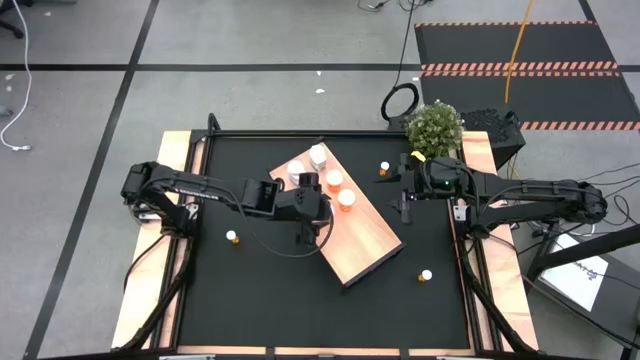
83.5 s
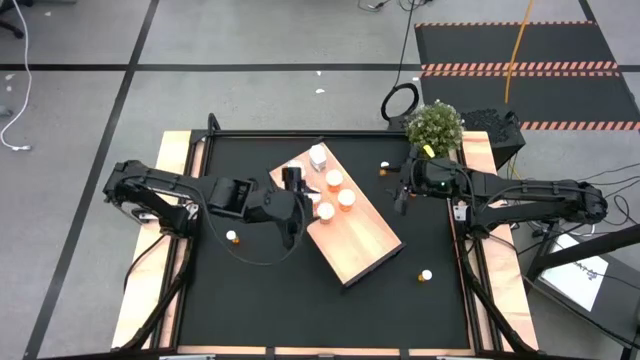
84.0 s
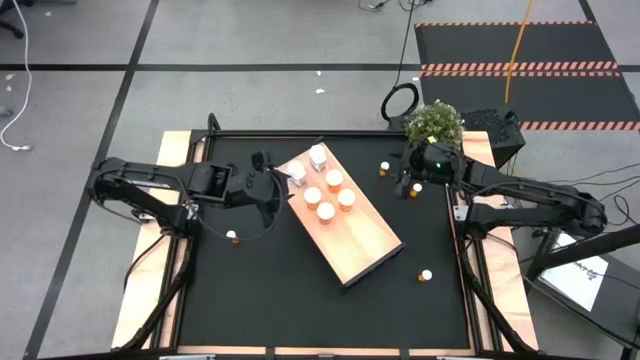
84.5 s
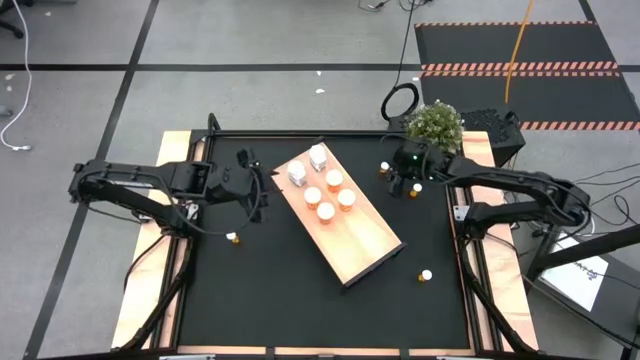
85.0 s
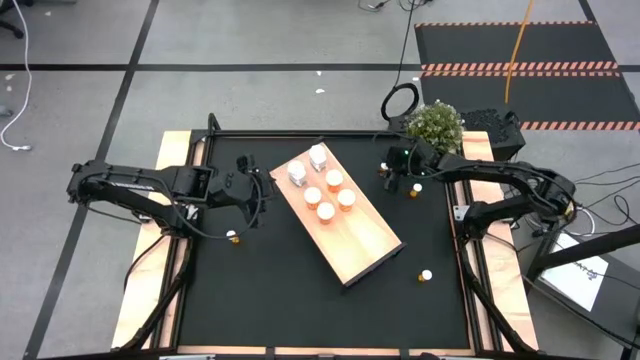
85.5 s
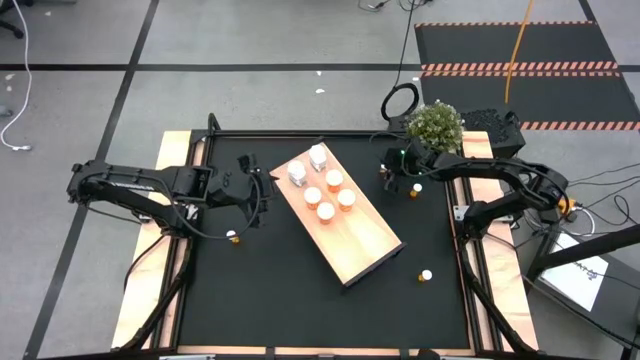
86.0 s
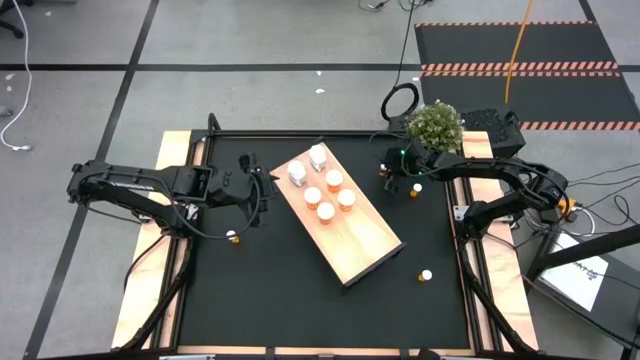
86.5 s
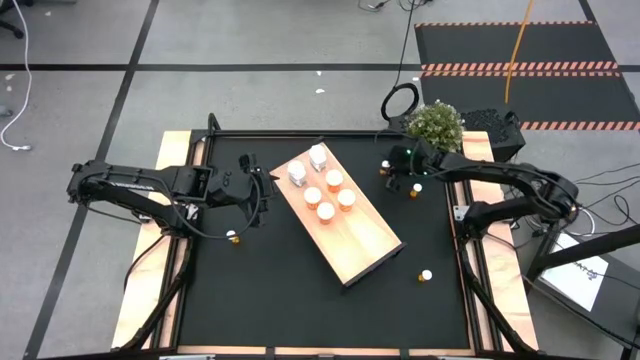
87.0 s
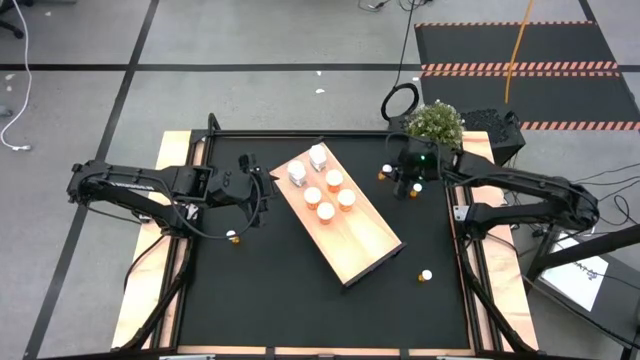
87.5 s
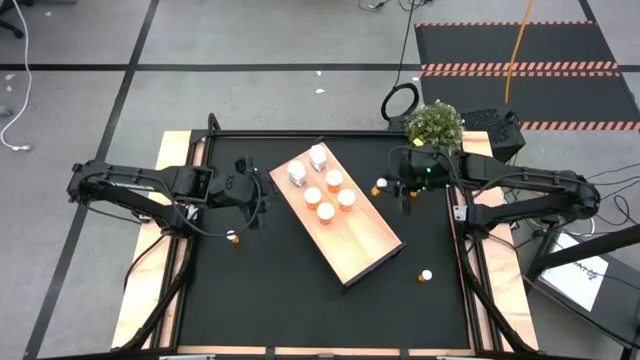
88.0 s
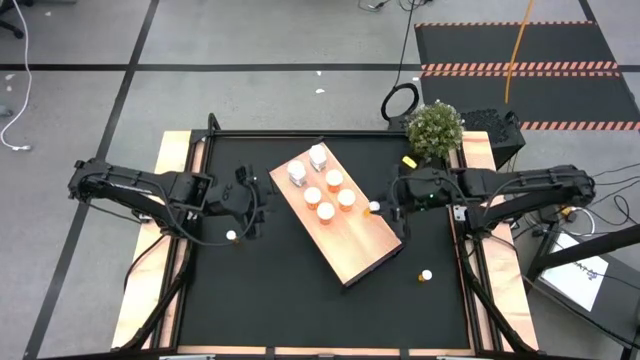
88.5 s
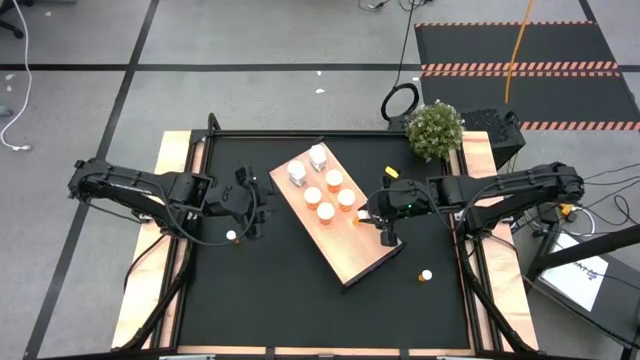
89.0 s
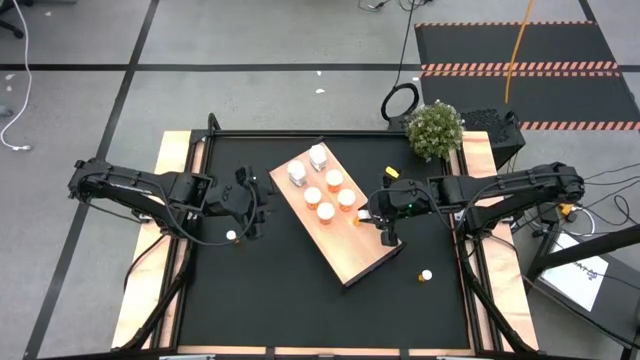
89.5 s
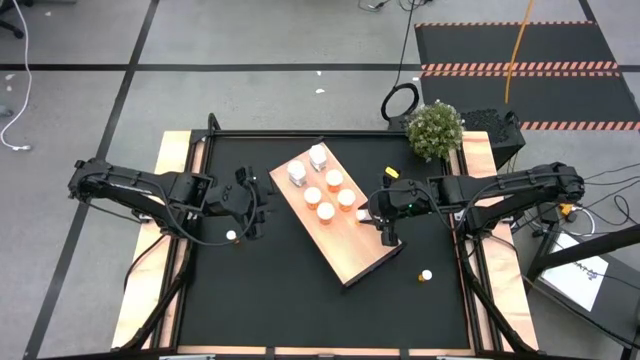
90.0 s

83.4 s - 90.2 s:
Task: Pick and place medicine bottles onto shelf by color
Put the orange tablet bottle on the shelf

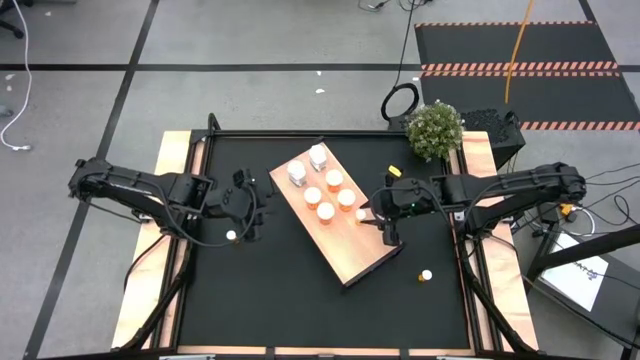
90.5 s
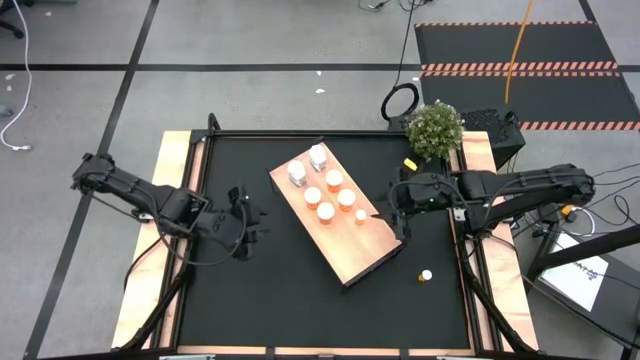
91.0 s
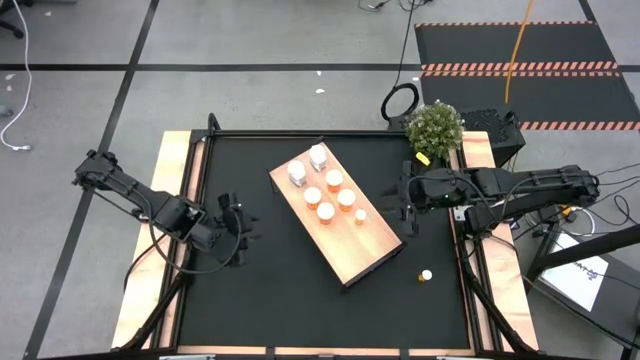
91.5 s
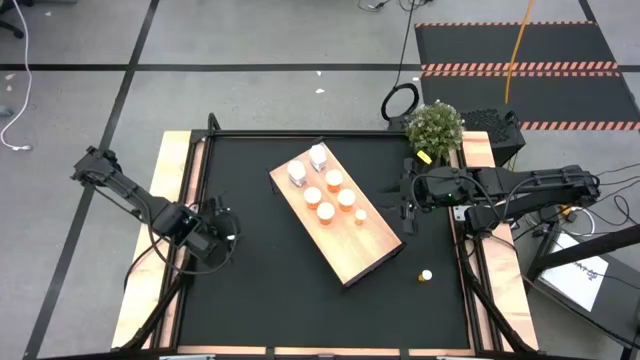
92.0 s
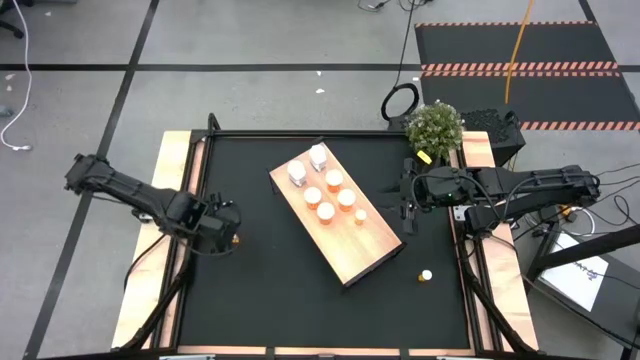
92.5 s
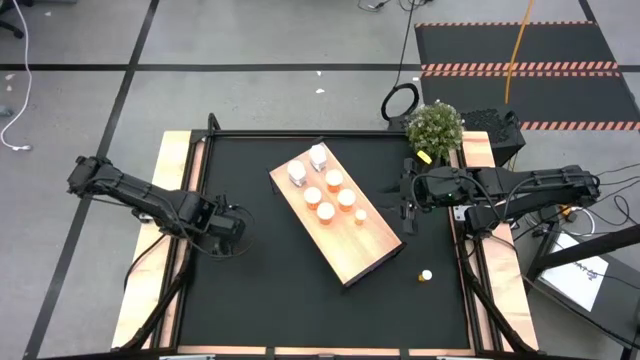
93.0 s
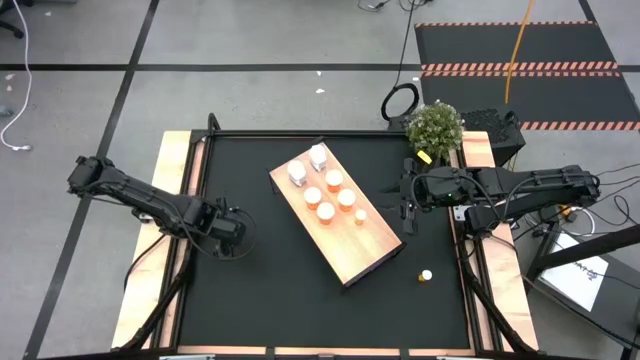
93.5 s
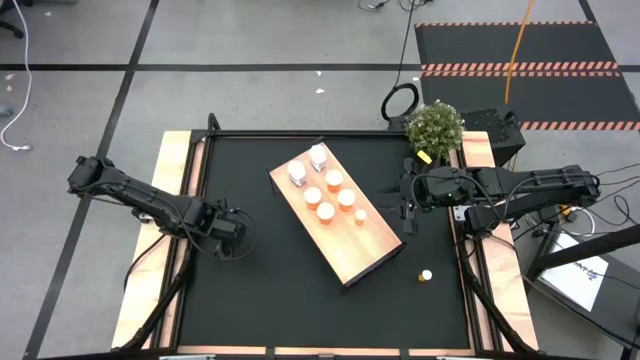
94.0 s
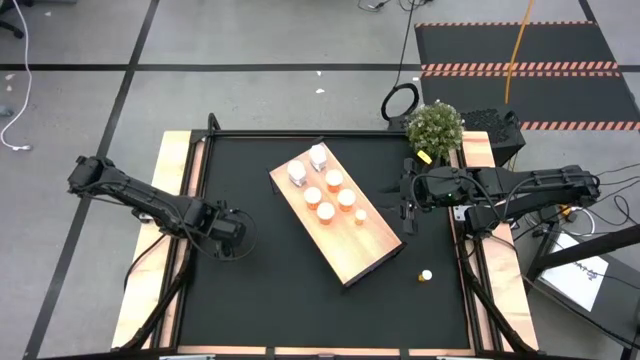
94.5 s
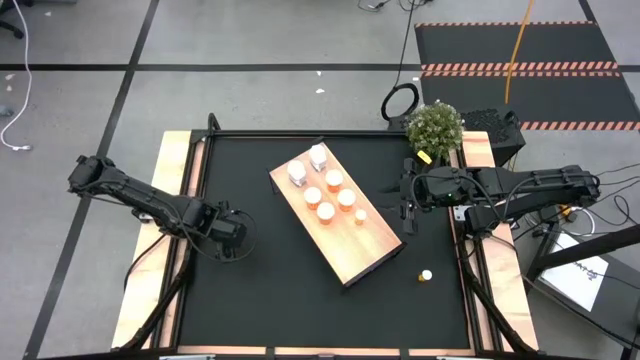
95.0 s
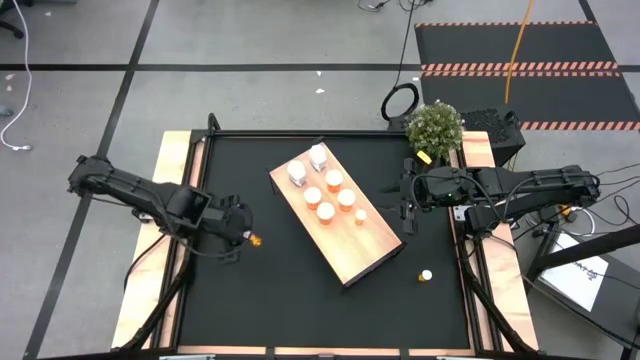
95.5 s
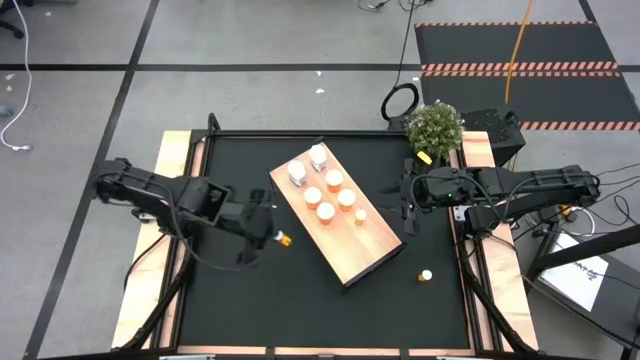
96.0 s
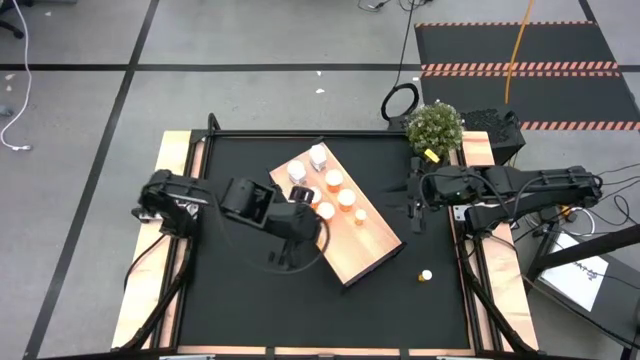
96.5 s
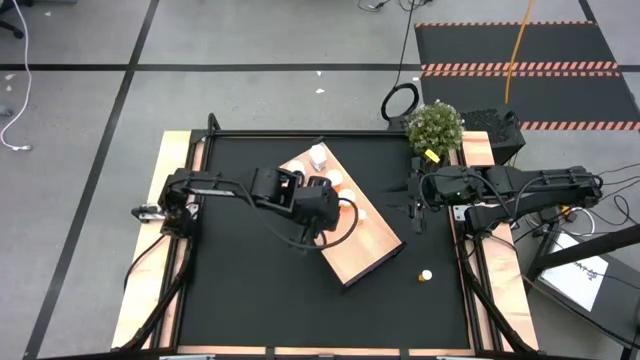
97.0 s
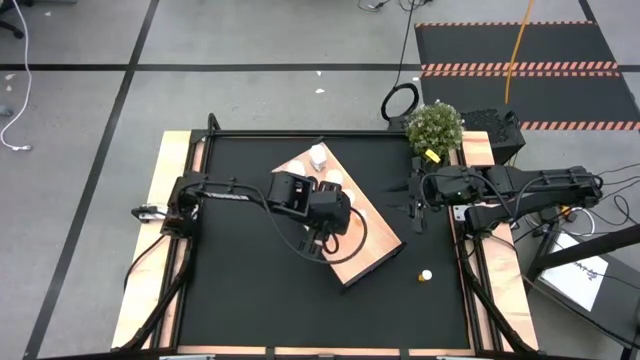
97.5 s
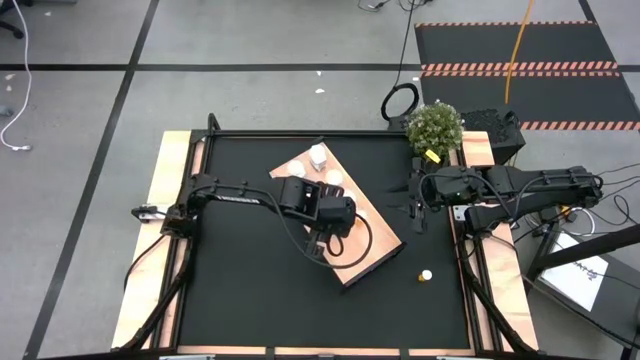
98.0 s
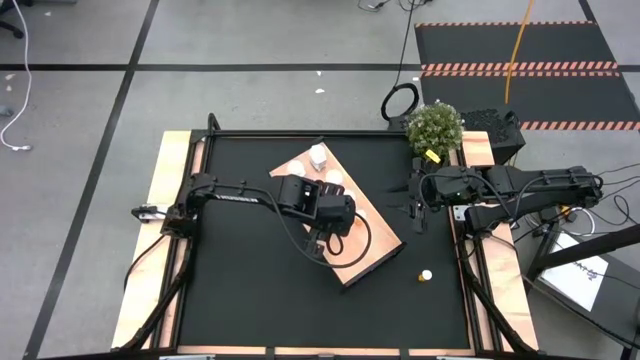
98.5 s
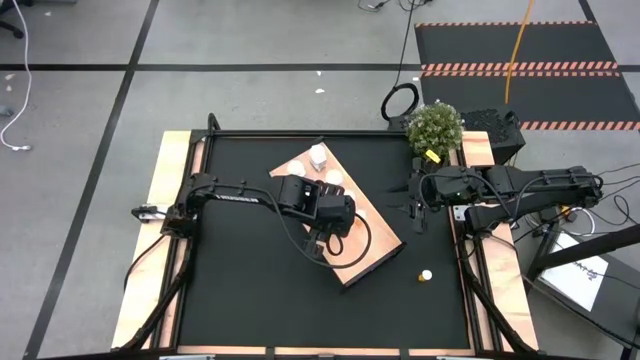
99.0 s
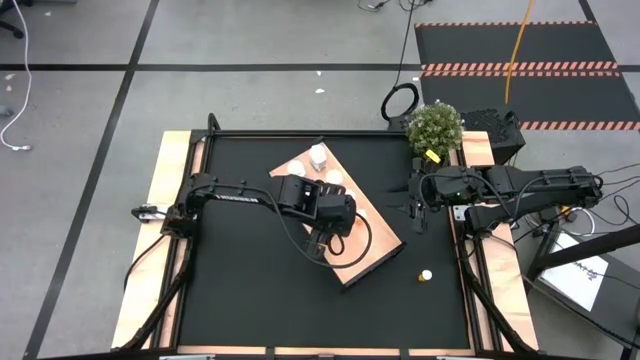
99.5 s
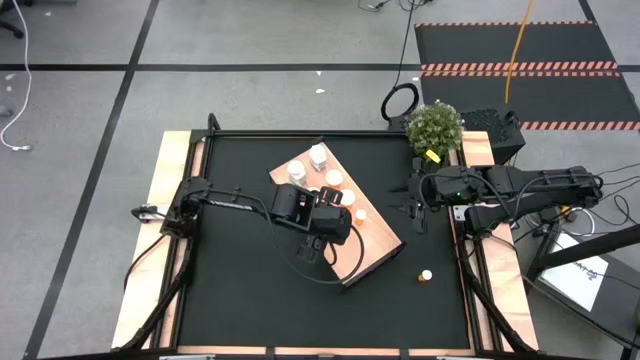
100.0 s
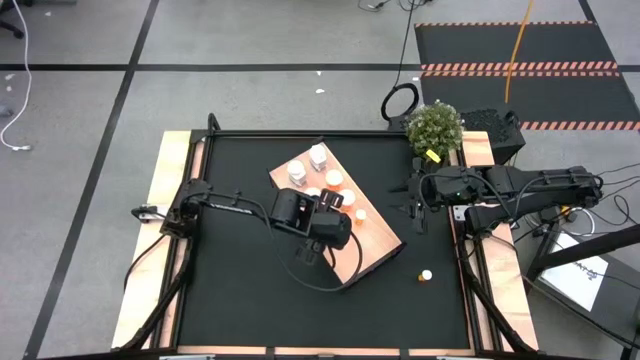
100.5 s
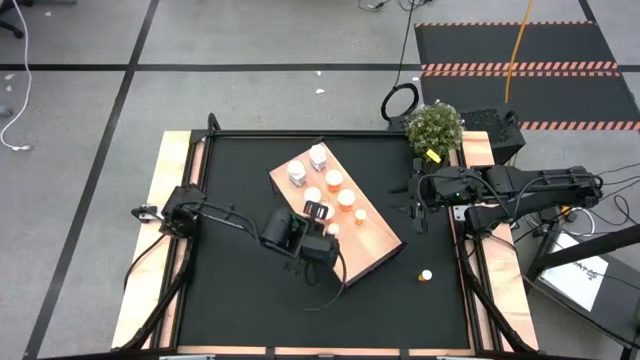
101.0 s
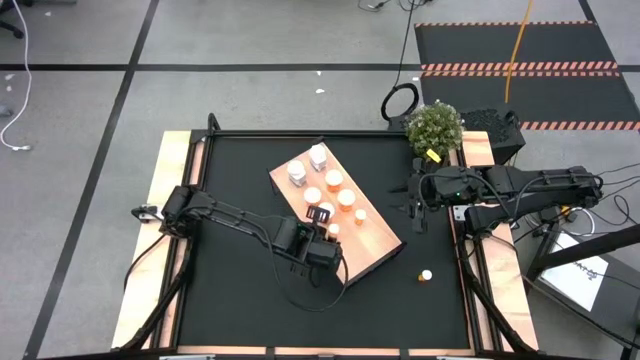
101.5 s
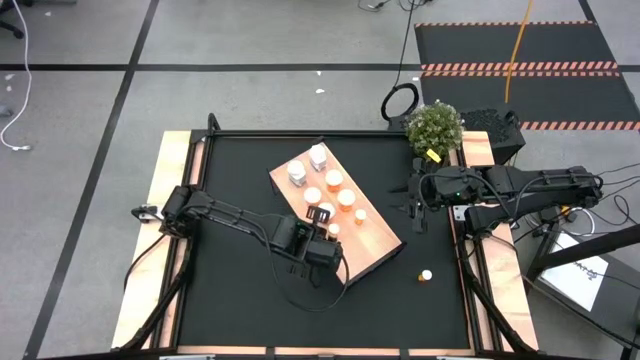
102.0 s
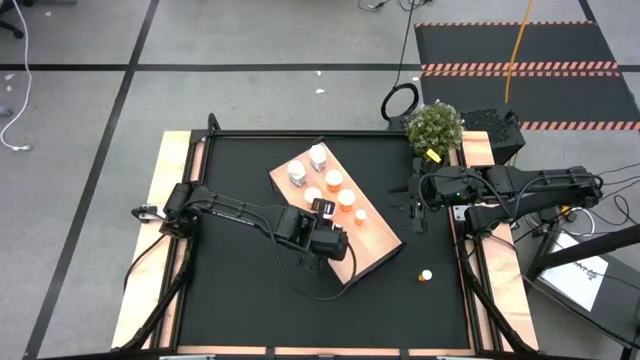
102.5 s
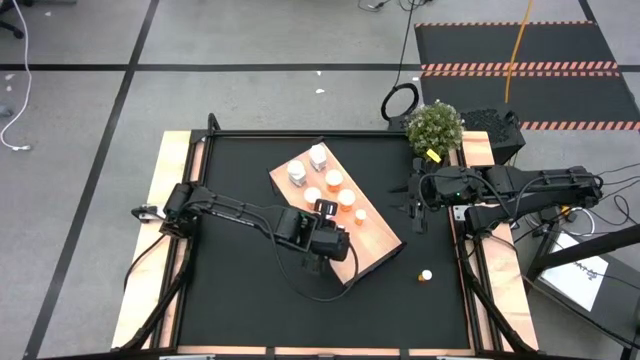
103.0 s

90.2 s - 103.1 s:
Put the middle orange tablet bottle on the shelf aligned with the orange tablet bottle

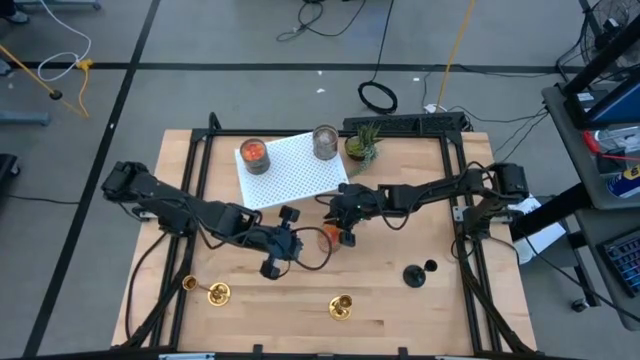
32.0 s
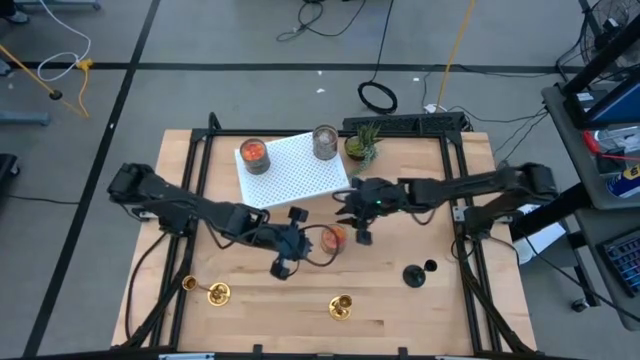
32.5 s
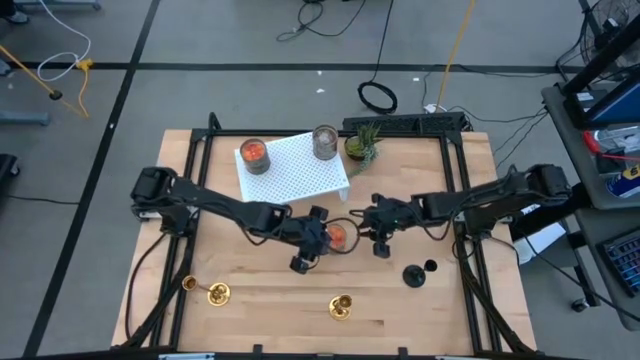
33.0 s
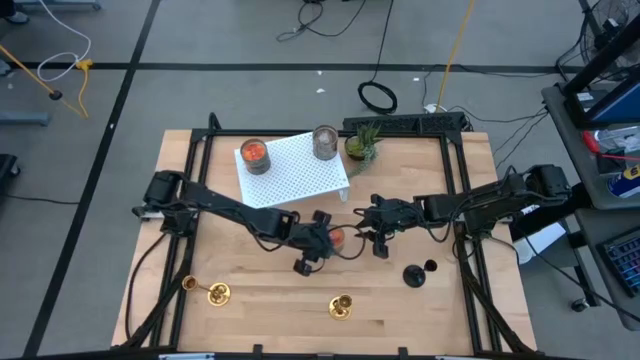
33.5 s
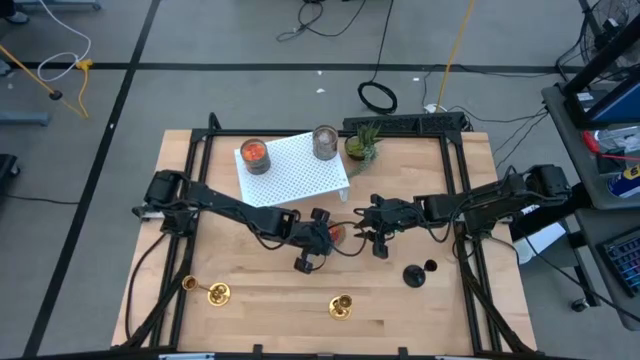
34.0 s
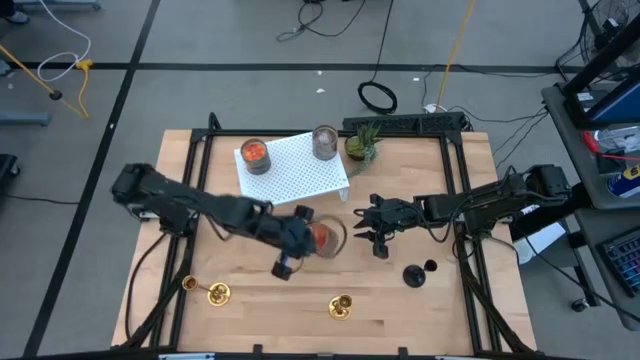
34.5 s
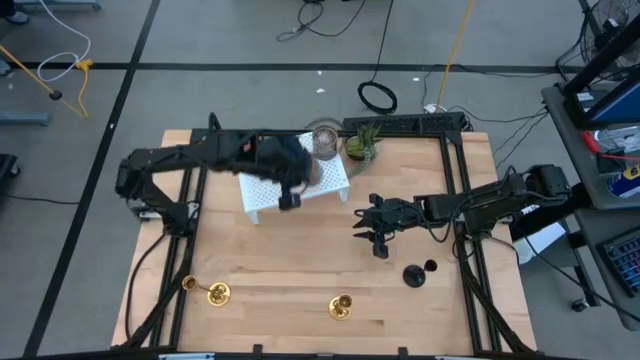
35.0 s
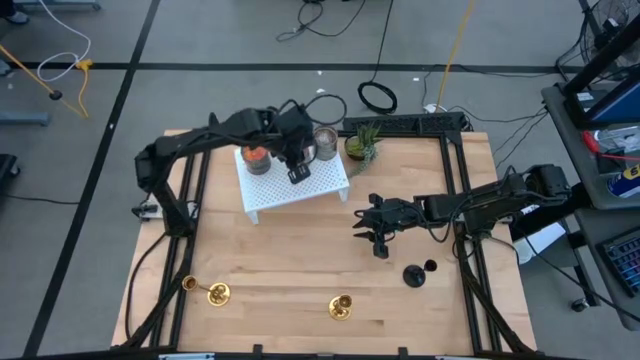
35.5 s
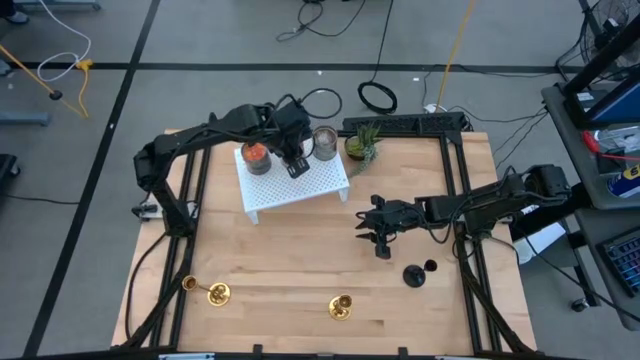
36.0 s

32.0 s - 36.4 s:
Task: Pick & Place candle stick holders
Put the orange scented candle on the shelf
